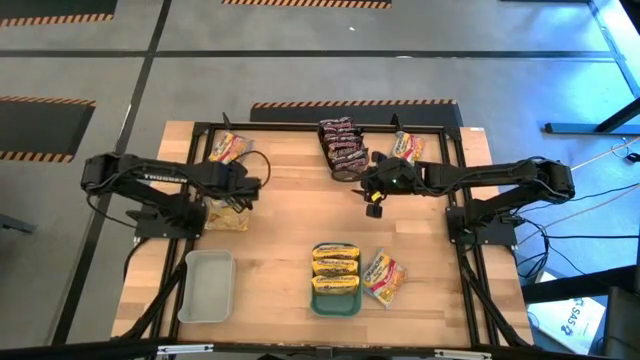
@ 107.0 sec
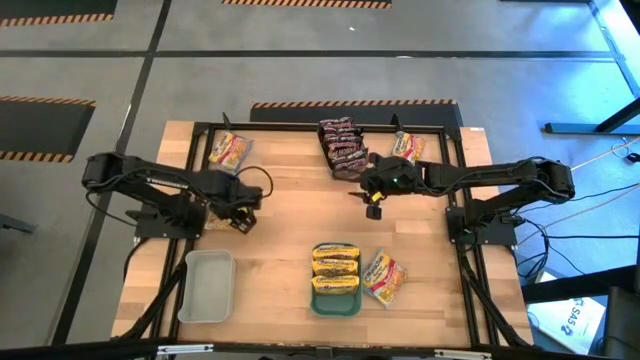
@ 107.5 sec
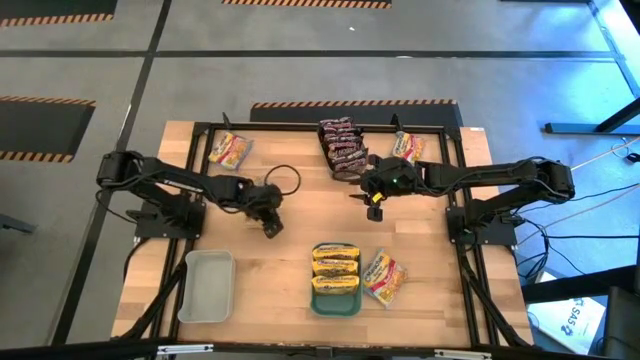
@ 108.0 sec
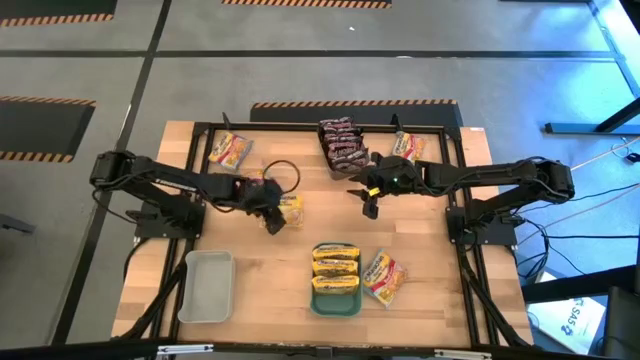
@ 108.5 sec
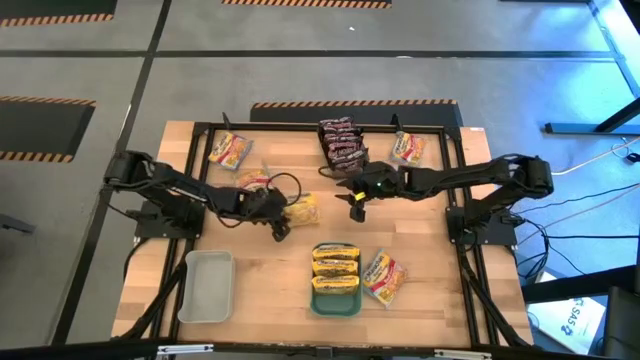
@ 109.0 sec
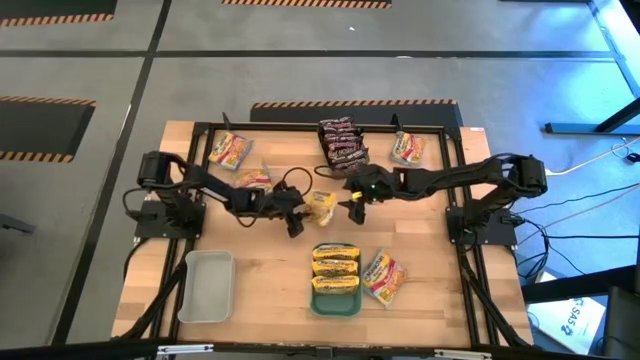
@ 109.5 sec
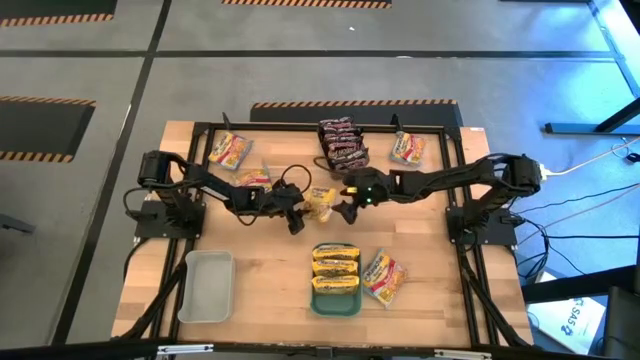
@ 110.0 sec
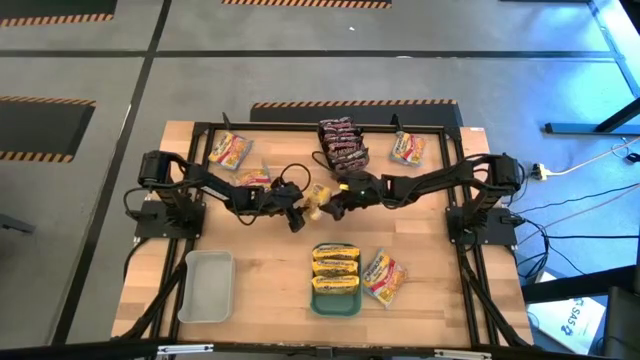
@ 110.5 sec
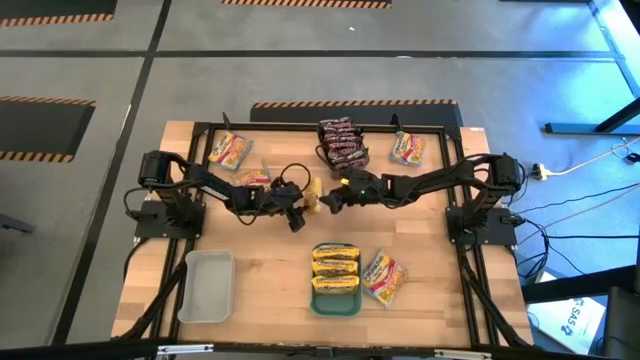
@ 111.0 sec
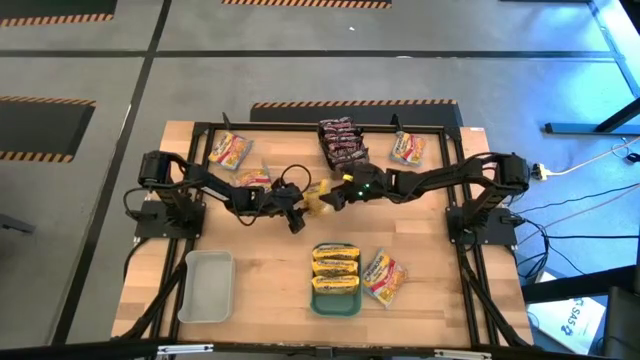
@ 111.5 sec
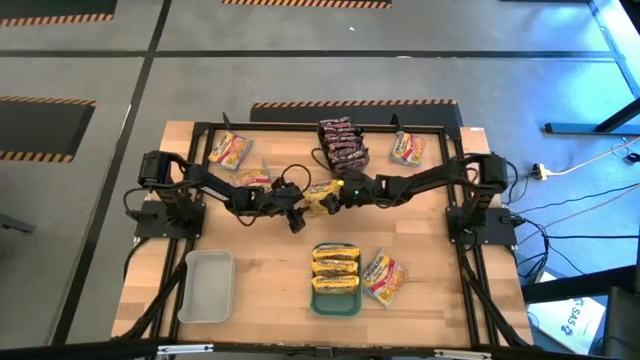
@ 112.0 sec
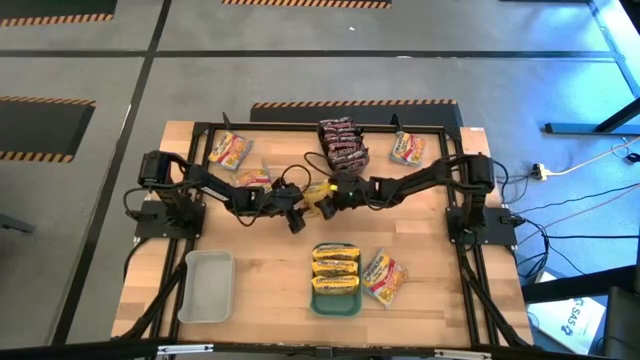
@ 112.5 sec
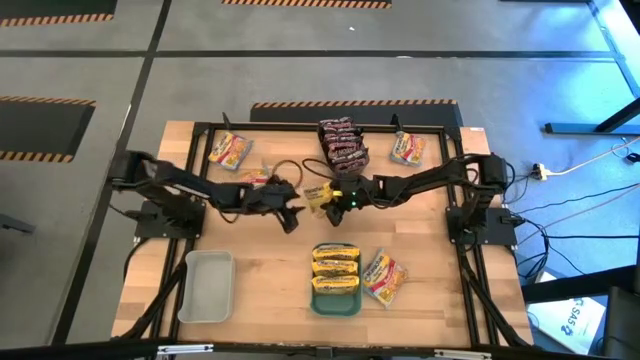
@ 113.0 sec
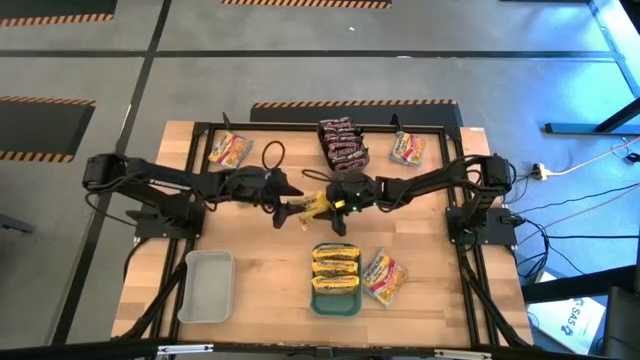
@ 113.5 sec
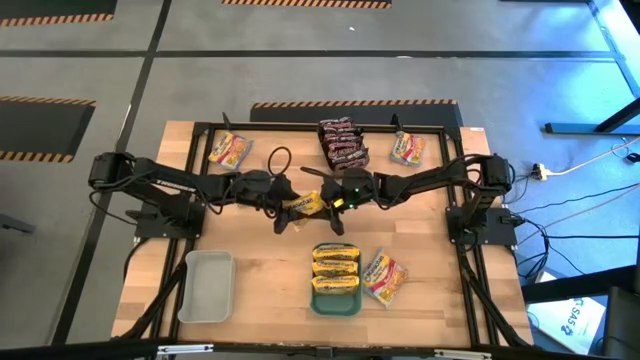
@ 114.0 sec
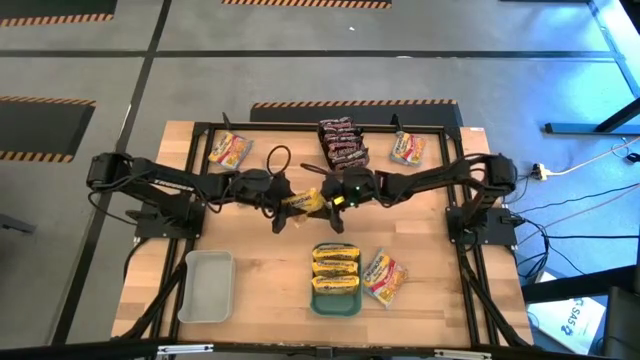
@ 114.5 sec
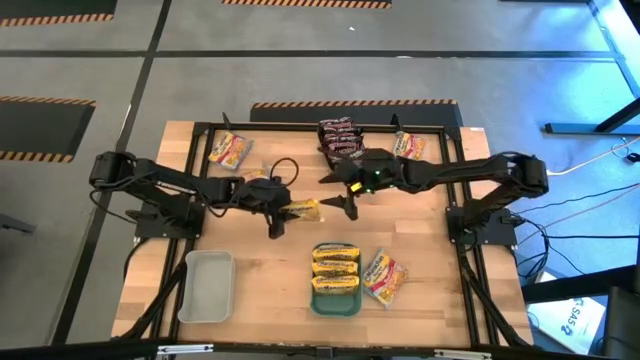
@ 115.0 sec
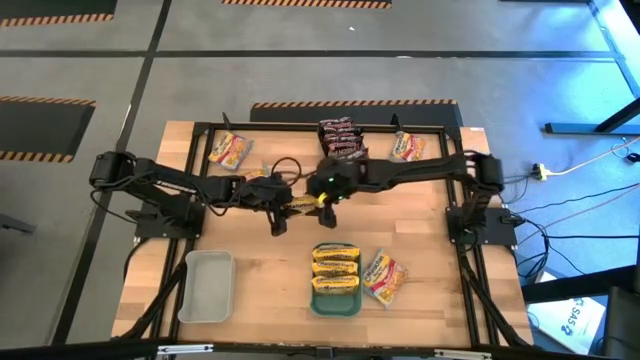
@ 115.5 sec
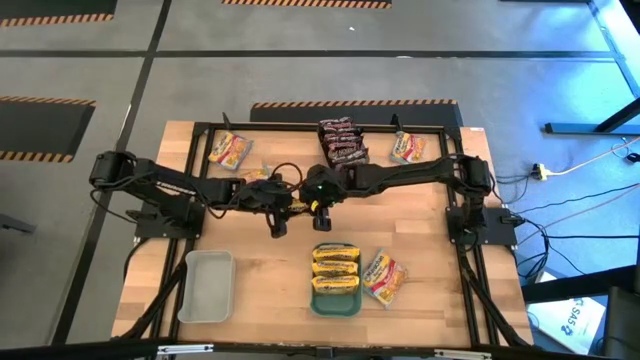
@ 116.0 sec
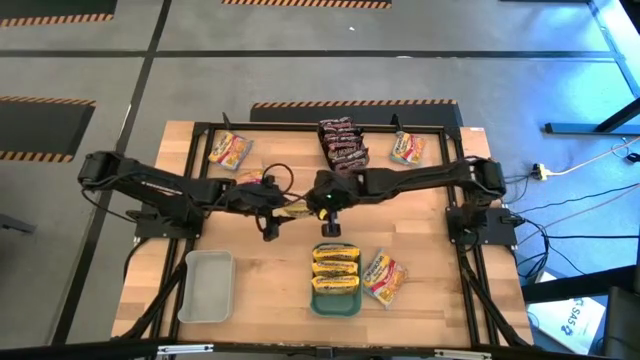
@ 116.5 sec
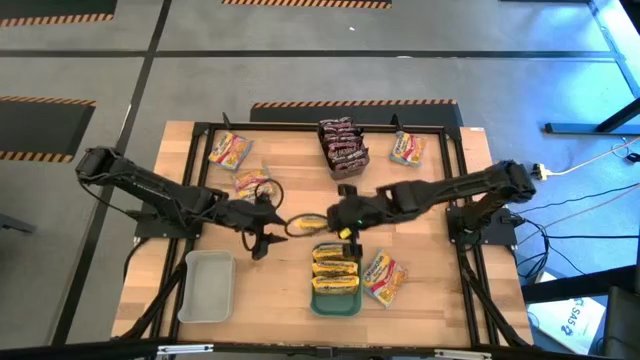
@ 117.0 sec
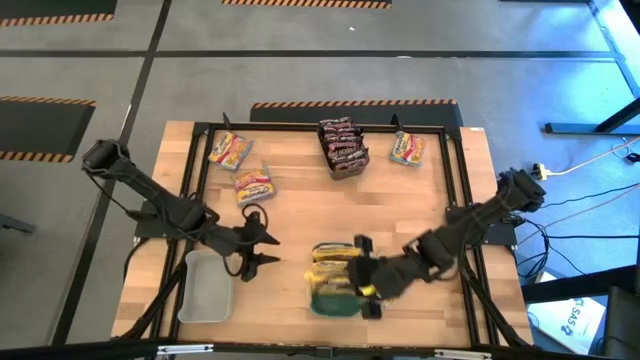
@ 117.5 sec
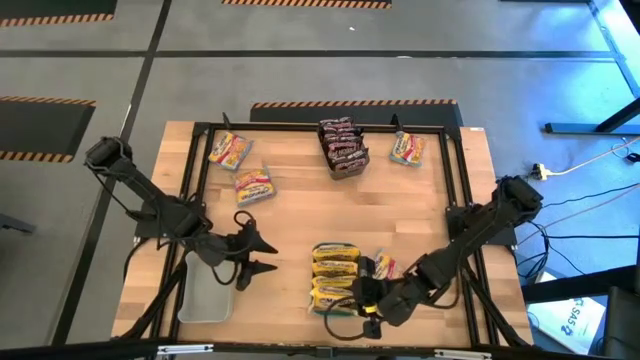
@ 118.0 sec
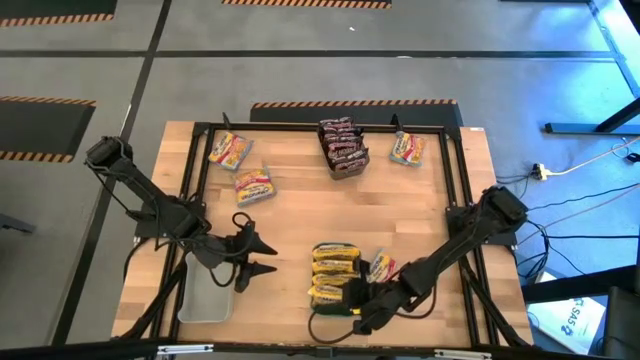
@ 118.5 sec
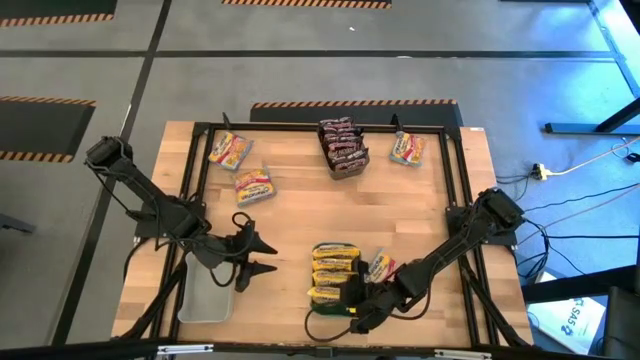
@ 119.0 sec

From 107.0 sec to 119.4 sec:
Task: Sort Maruchan noodles
Put the yellow noodle pack into the green bin

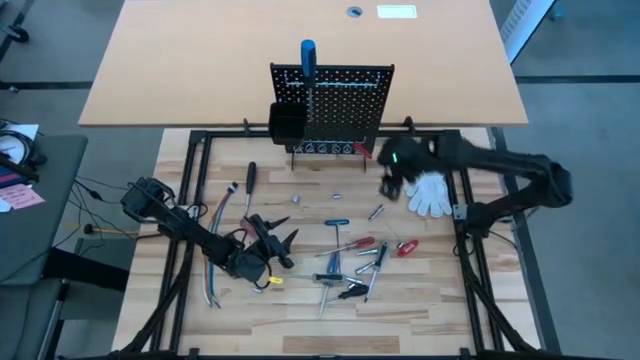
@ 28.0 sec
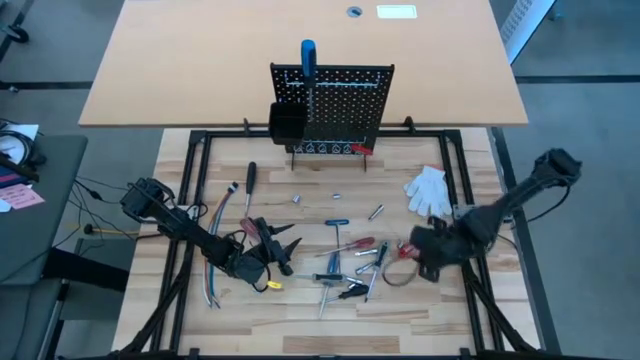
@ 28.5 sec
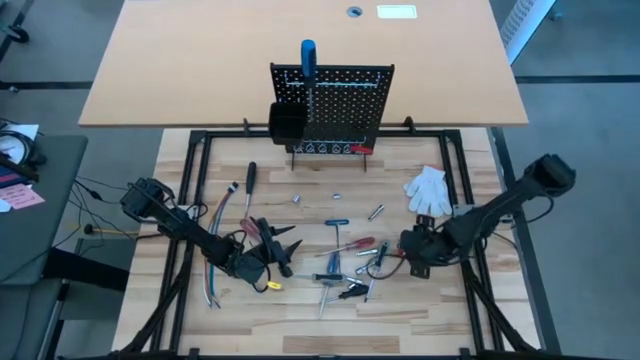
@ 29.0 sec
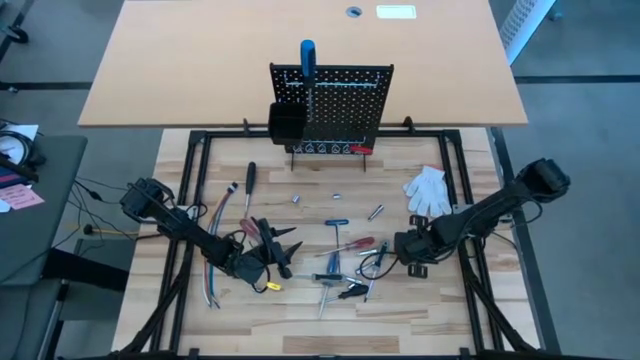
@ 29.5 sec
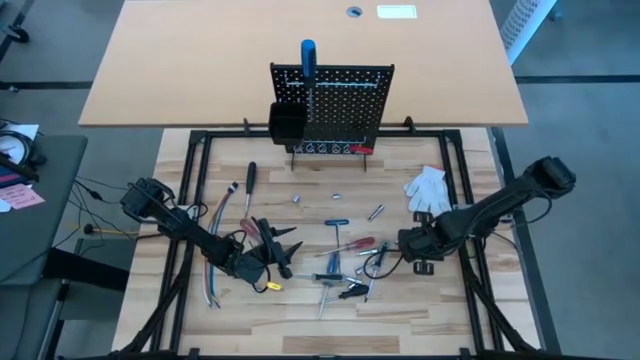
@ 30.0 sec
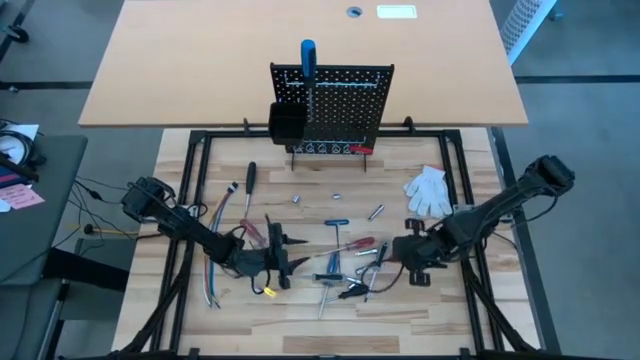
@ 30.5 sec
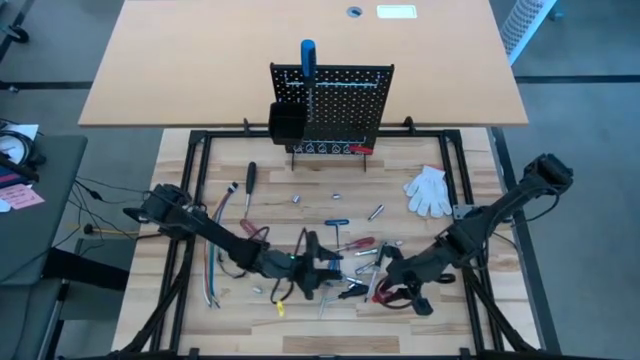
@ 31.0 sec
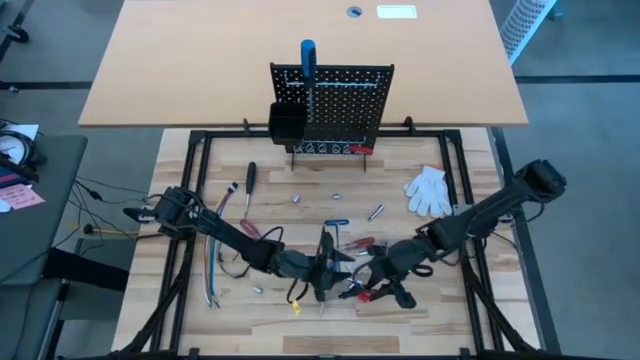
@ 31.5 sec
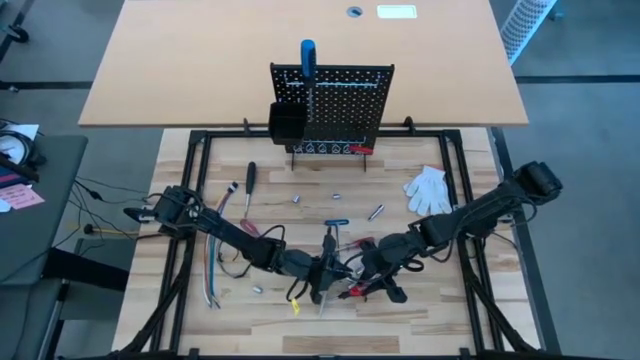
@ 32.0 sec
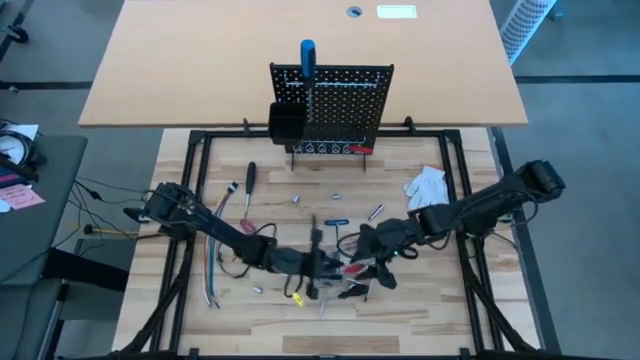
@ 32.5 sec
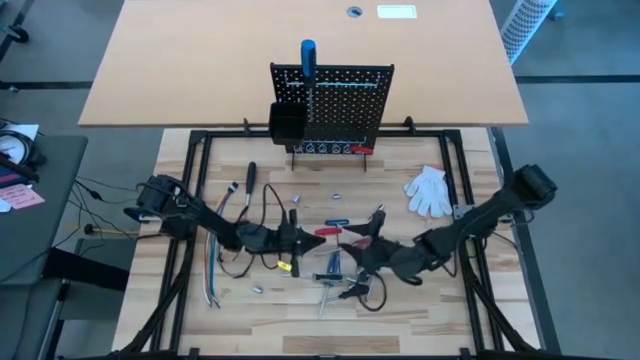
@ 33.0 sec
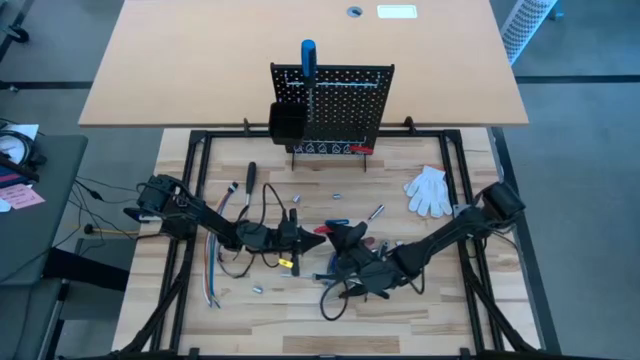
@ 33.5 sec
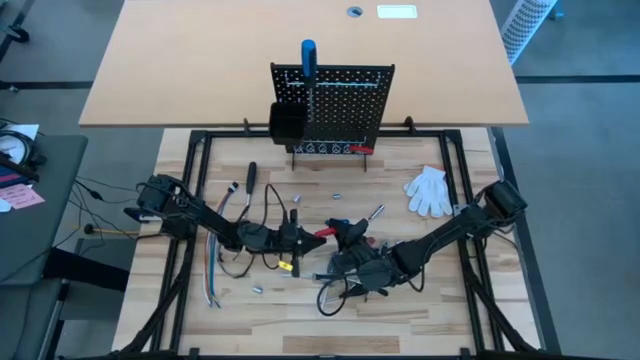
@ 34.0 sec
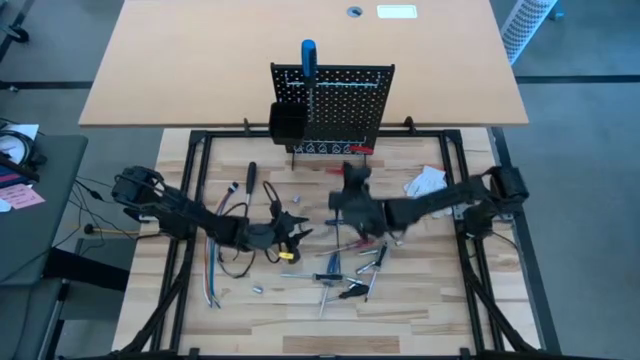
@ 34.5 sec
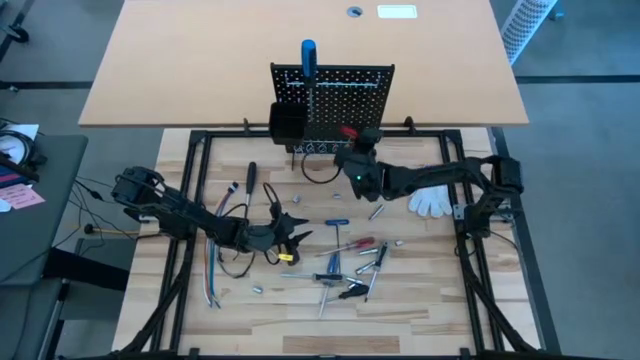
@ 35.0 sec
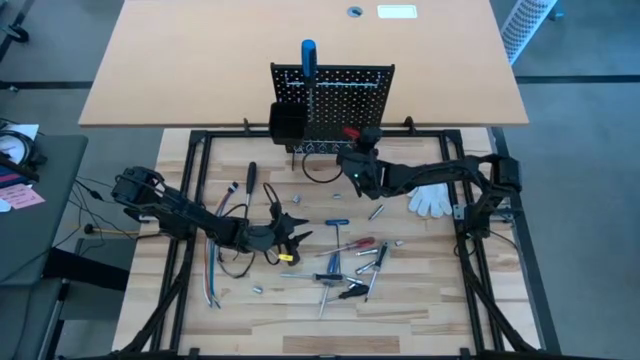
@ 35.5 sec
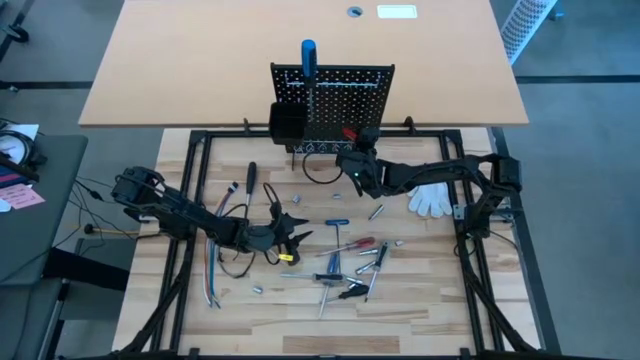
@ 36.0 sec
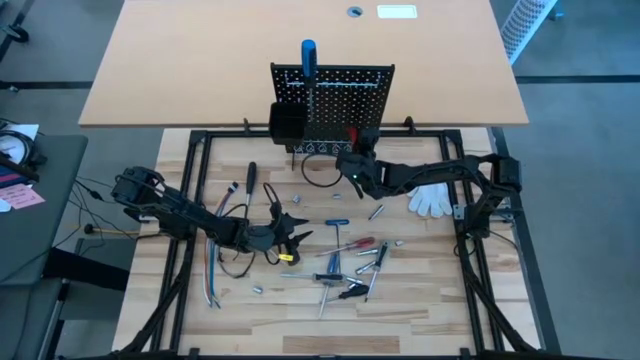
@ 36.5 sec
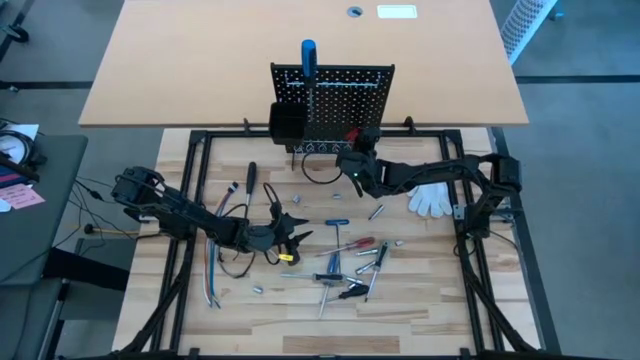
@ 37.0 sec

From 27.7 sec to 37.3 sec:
Task: Hang tools onto peg board
Hang the red allen wrench on the black pegboard
